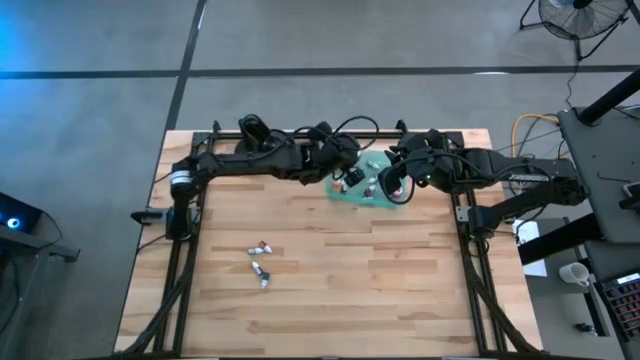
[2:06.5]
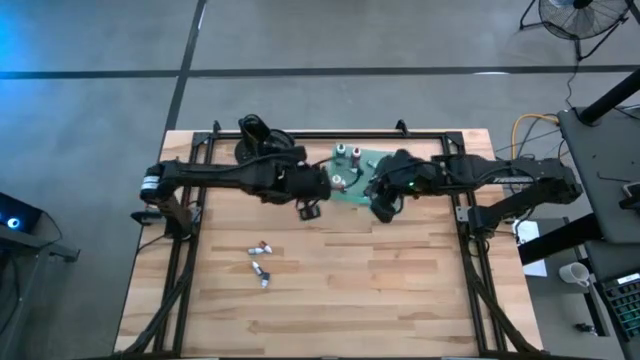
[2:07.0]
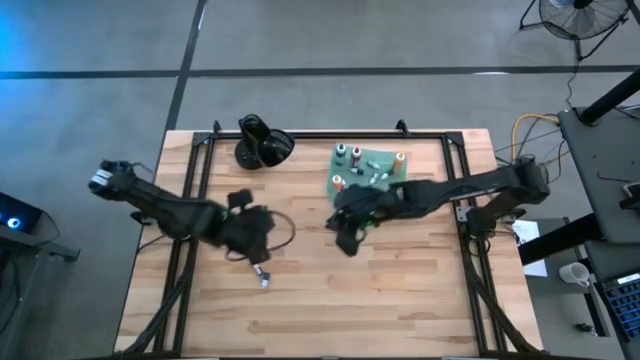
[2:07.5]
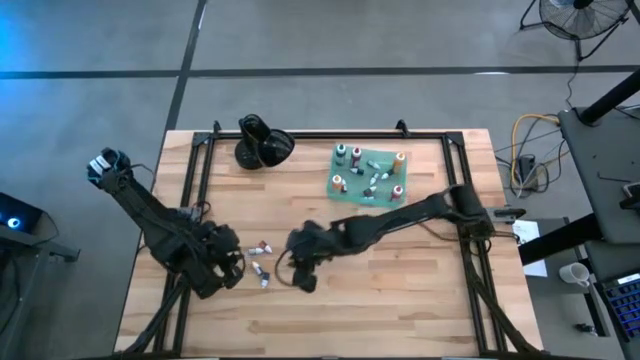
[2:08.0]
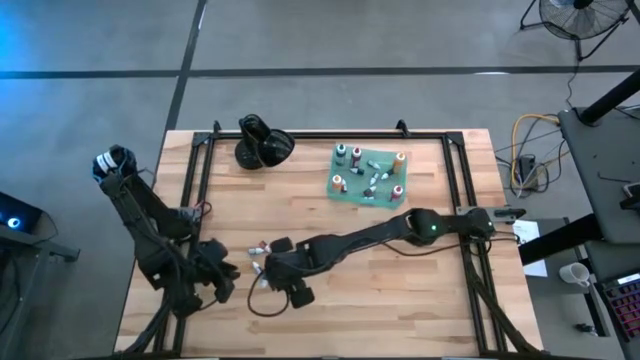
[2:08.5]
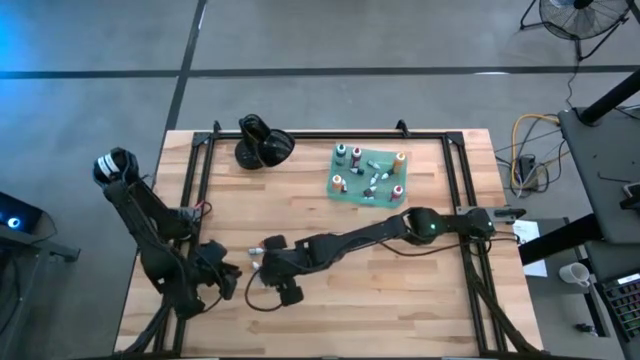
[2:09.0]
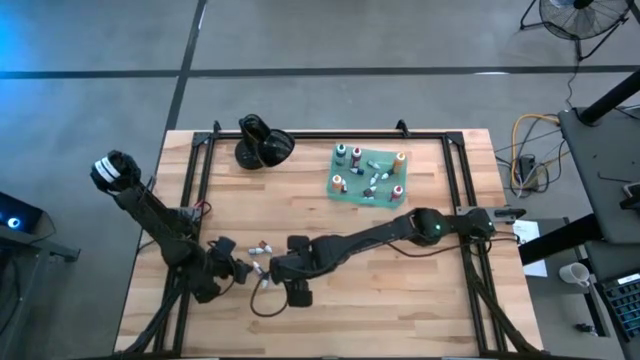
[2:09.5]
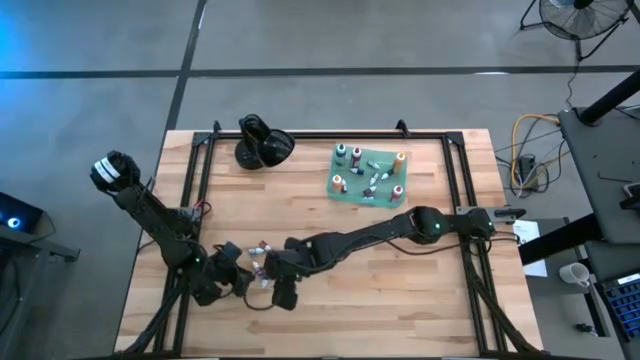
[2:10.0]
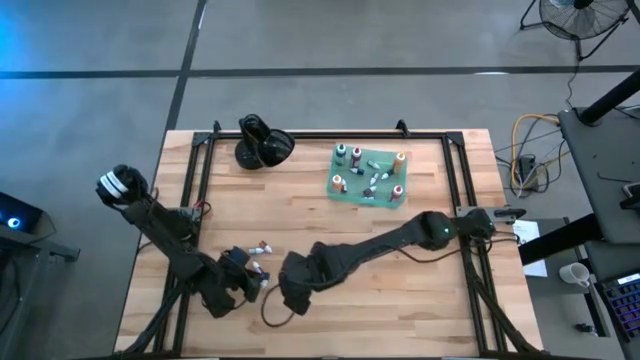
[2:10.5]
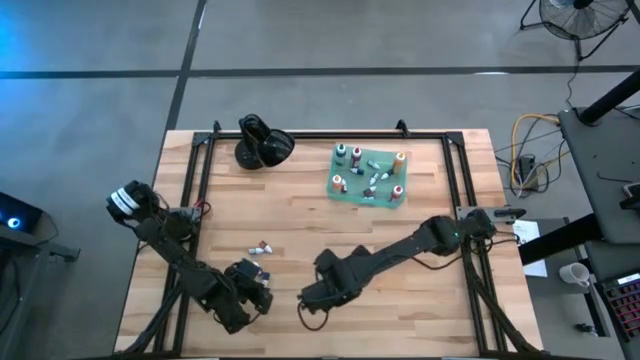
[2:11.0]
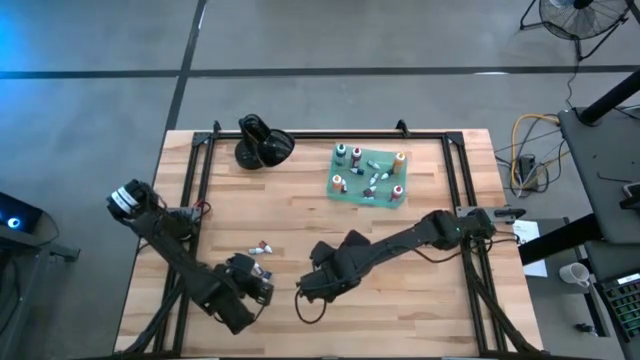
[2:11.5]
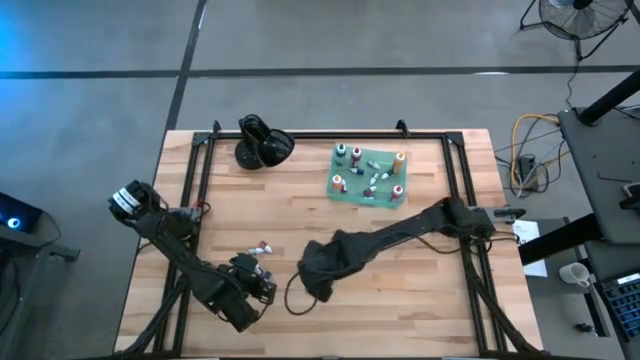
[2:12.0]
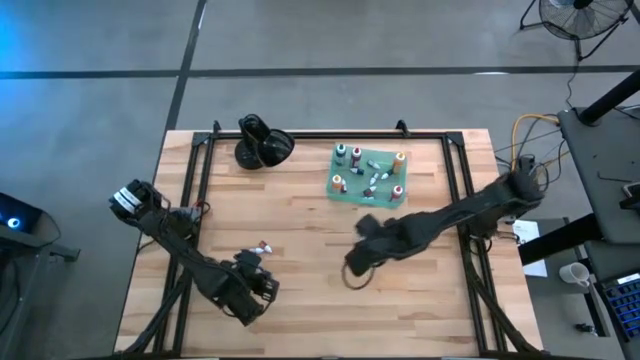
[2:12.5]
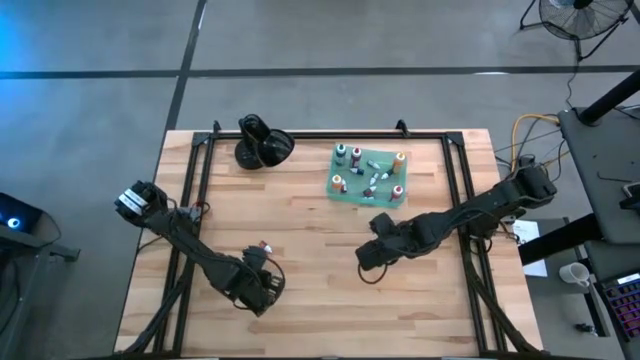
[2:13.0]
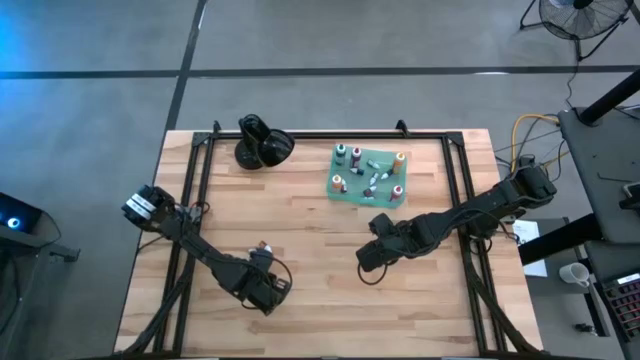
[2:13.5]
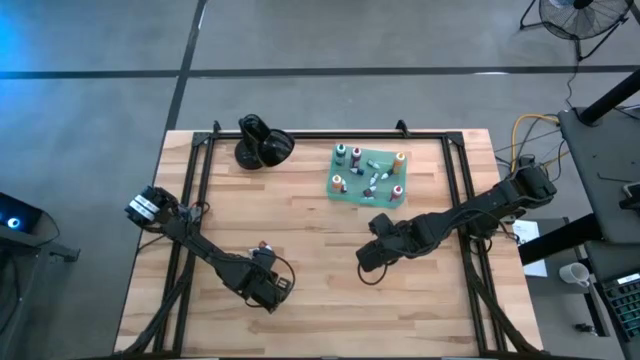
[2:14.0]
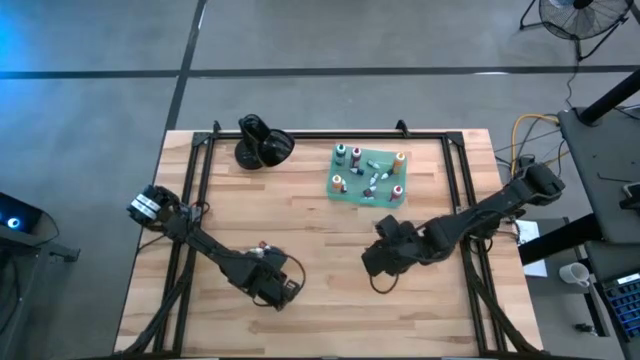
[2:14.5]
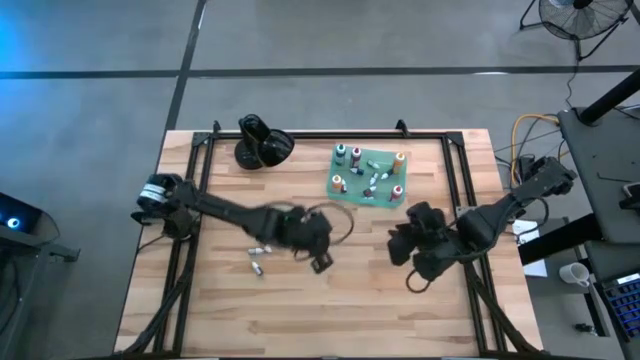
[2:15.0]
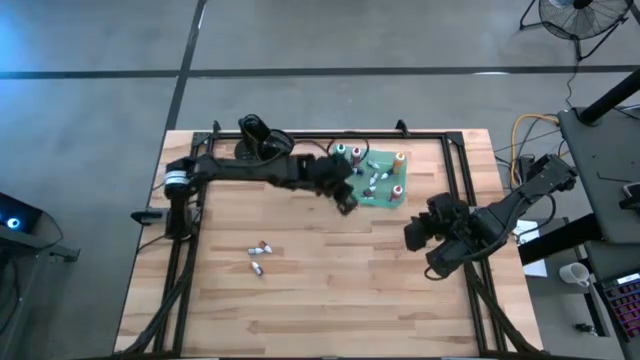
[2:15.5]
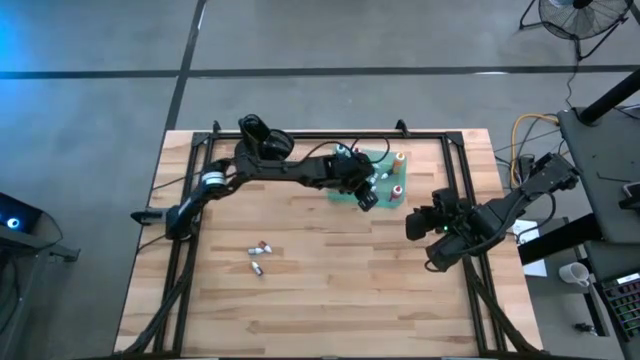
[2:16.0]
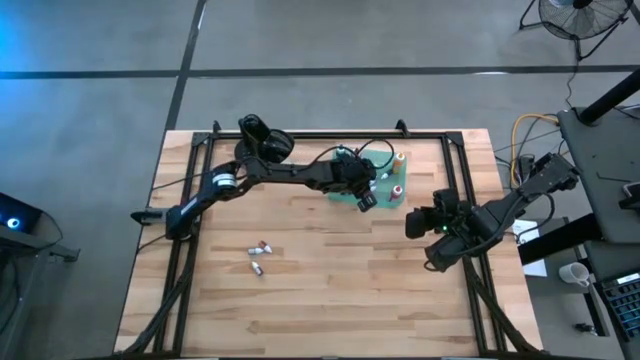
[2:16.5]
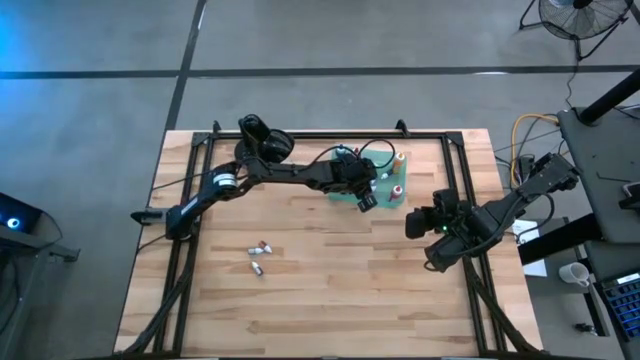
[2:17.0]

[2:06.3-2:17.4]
Task: Pick & Place food coloring
Put the dark blue food coloring bottle into the green bin

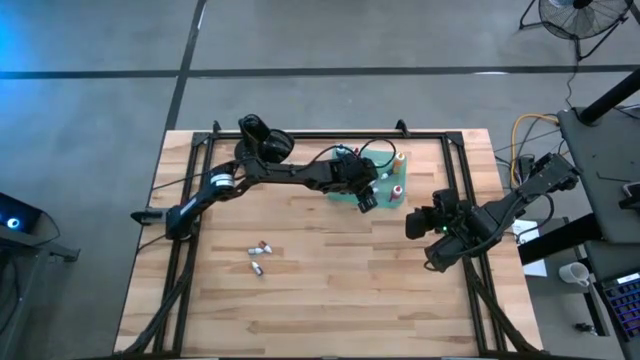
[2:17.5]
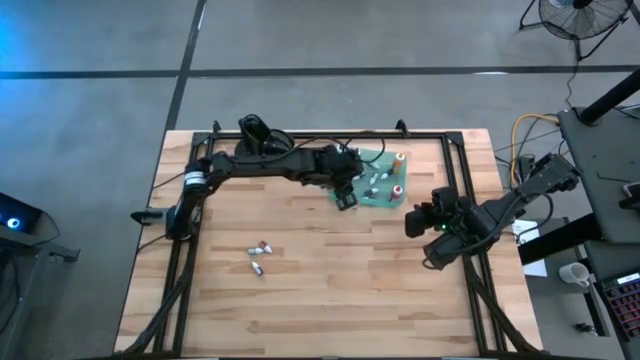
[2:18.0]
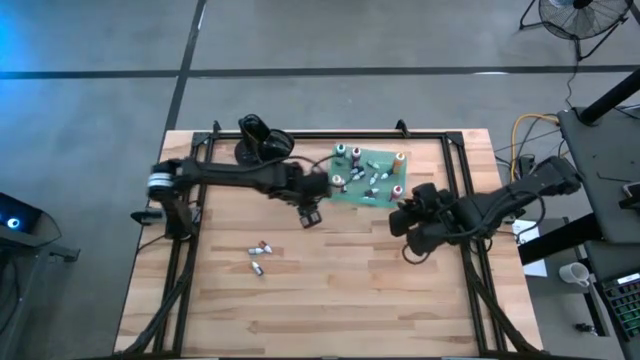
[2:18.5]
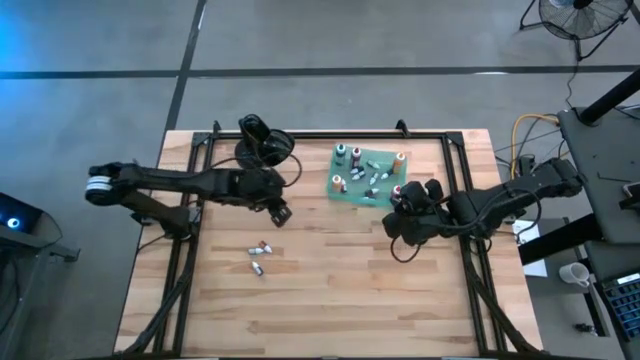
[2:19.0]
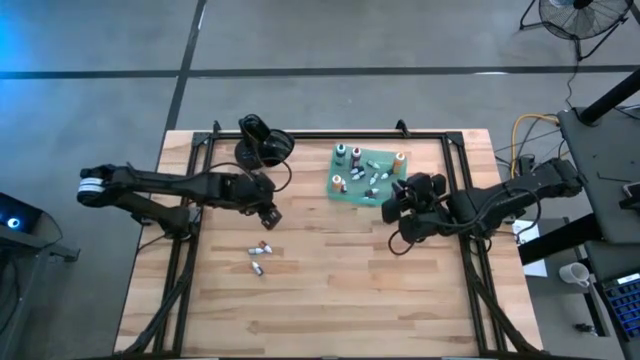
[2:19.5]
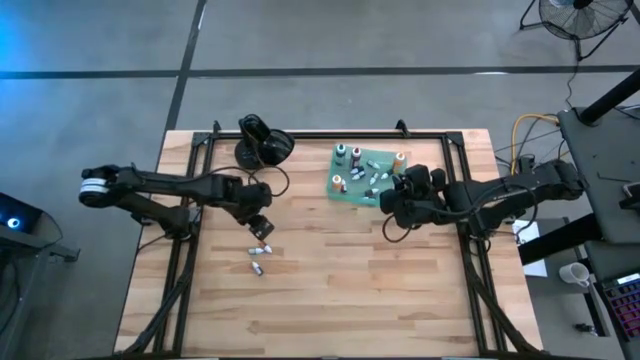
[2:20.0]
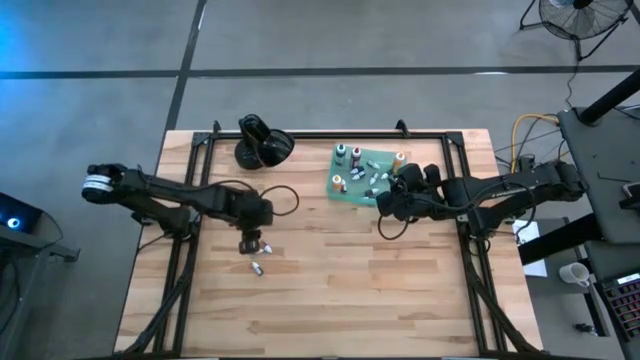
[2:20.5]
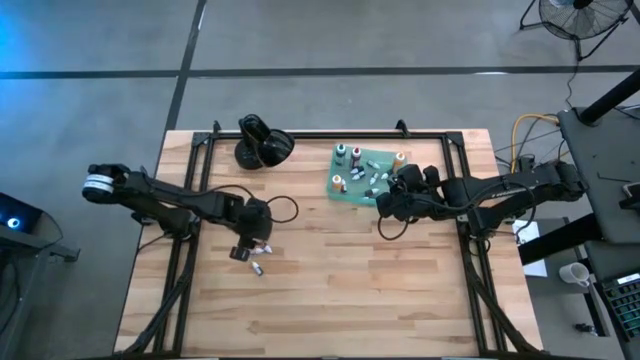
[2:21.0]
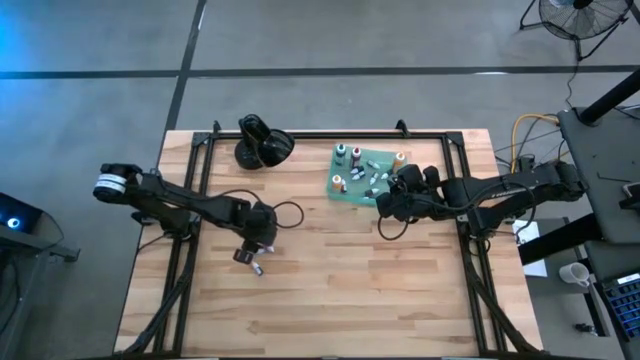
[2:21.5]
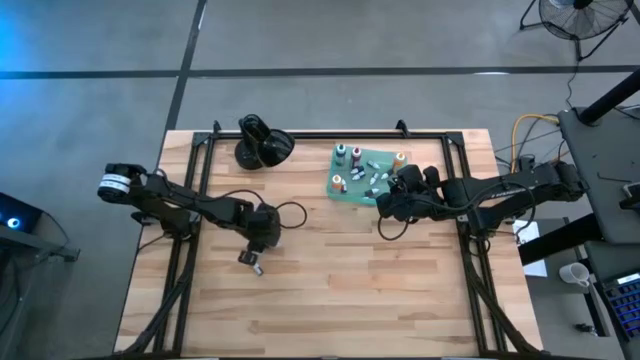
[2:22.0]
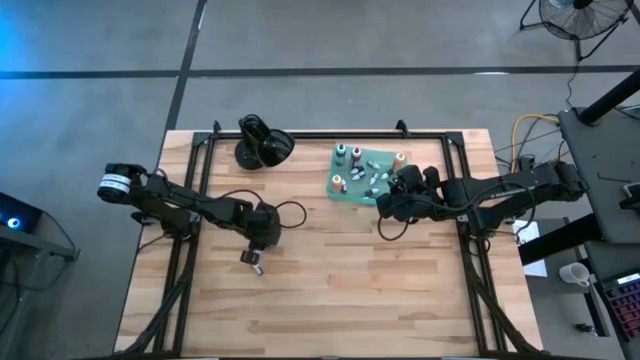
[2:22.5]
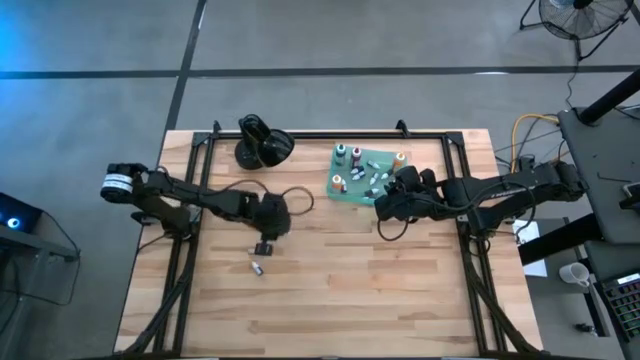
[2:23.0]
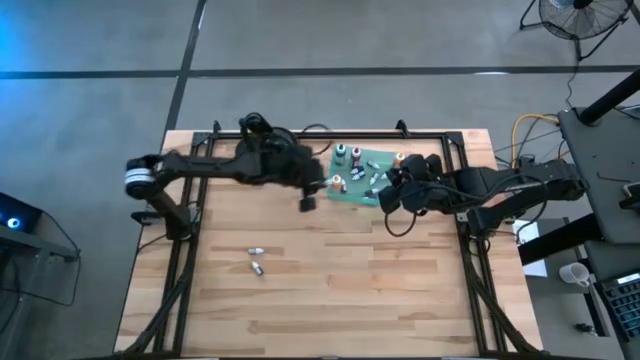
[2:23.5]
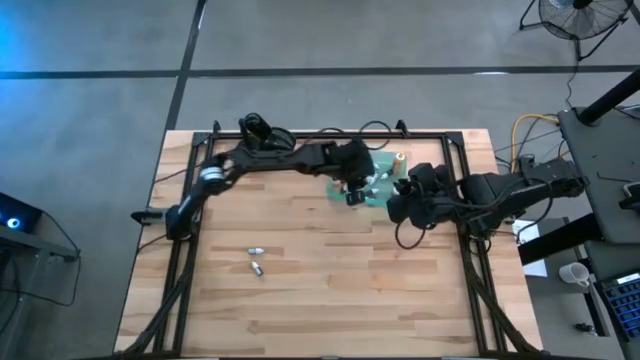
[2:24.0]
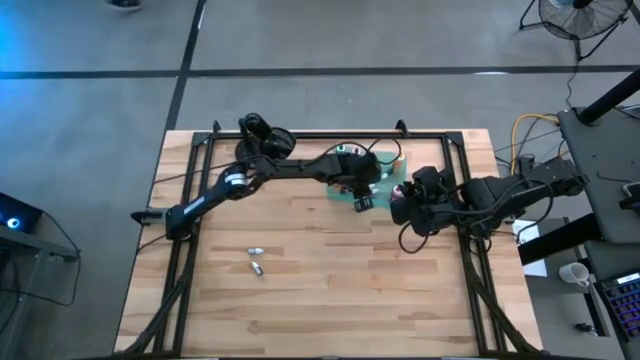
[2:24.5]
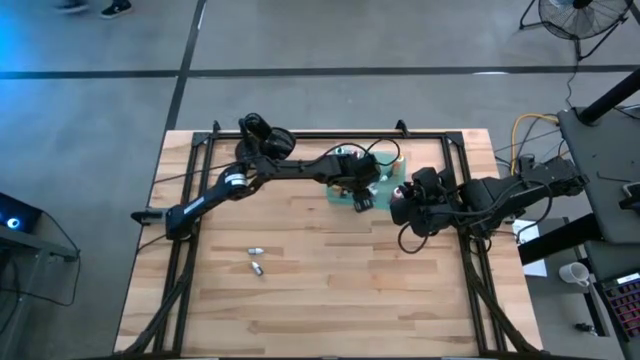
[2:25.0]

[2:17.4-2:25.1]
Put the orange food coloring bottle into the green bin

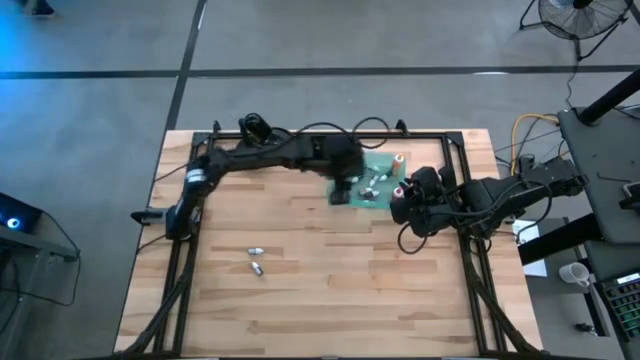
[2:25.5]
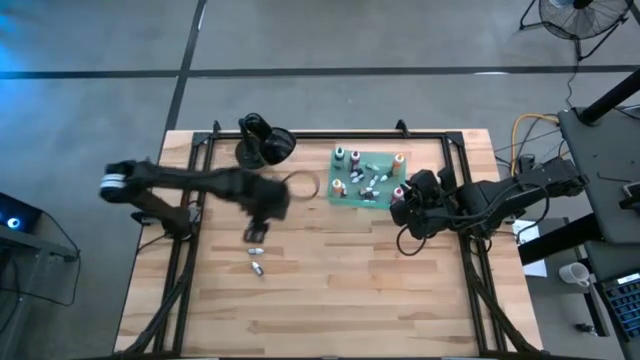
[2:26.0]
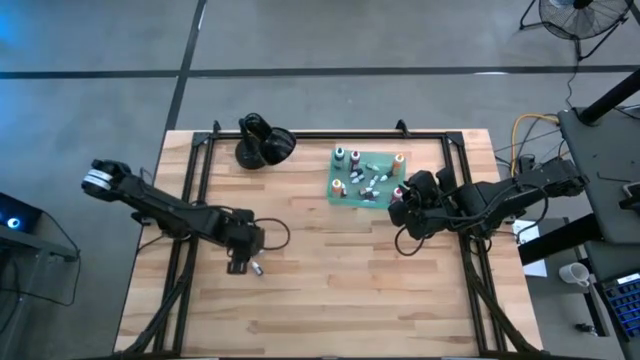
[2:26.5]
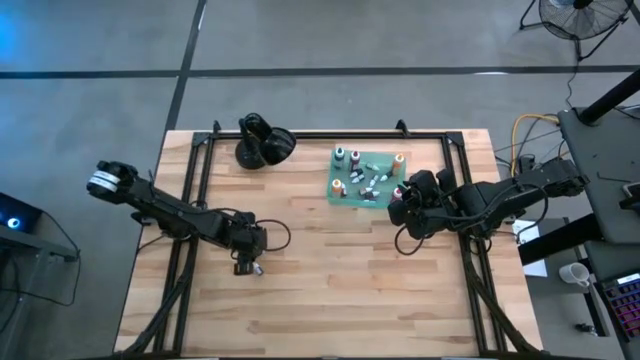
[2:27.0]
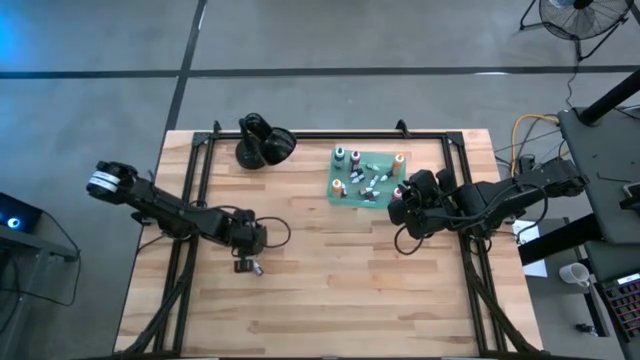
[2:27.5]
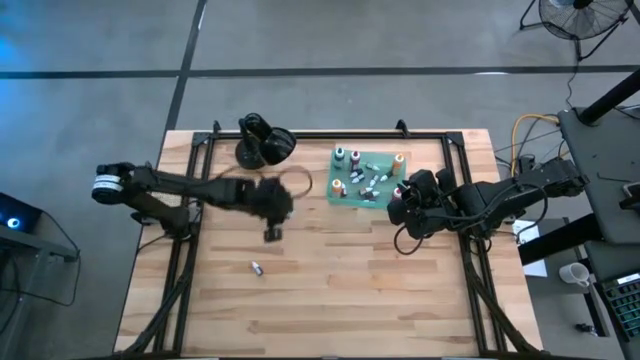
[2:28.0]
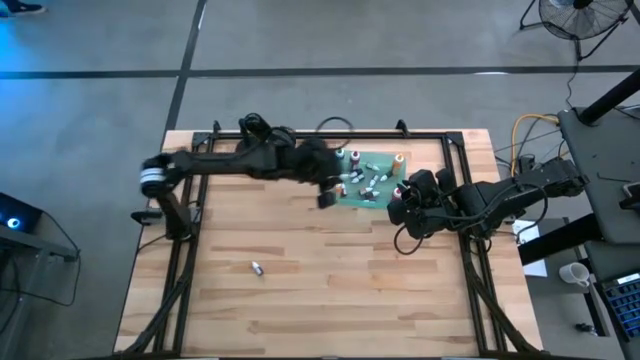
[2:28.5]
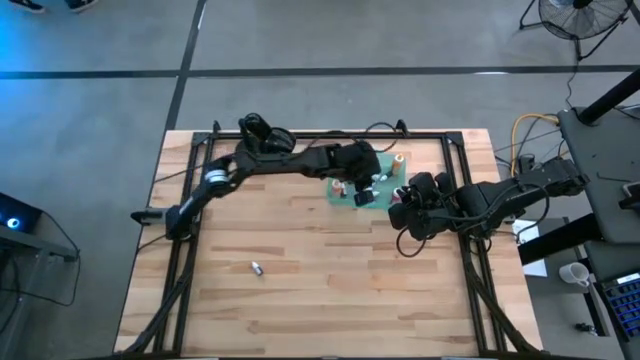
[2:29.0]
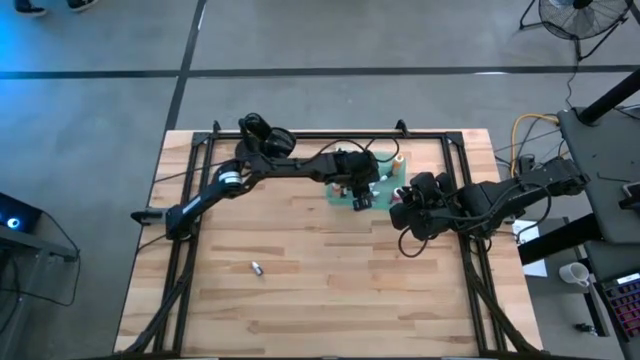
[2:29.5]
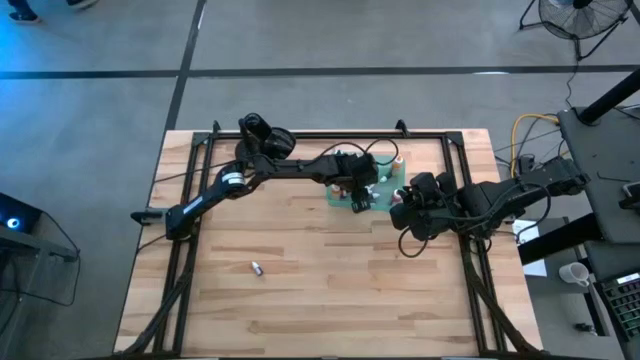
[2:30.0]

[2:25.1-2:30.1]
Put the green food coloring bottle into the green bin
